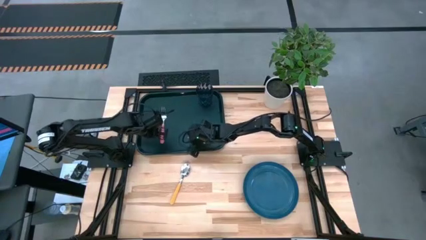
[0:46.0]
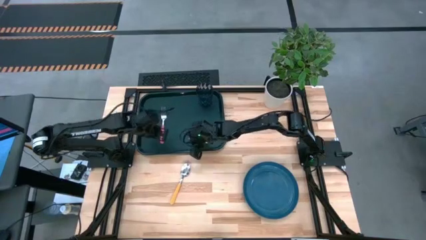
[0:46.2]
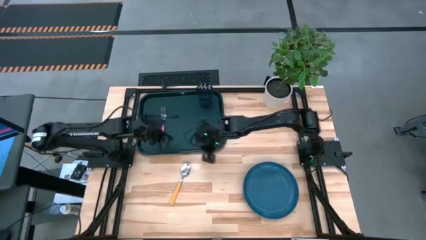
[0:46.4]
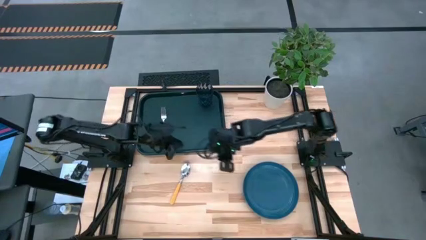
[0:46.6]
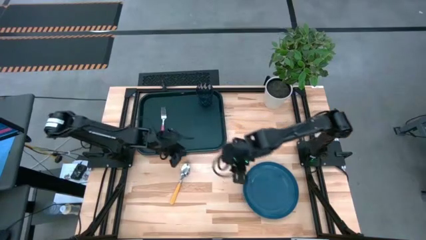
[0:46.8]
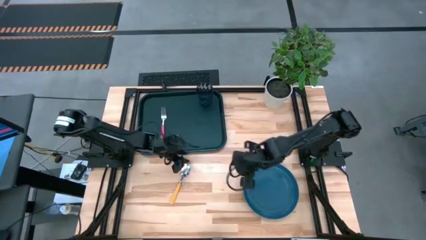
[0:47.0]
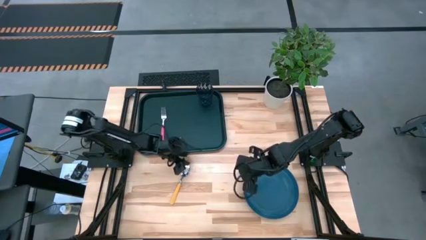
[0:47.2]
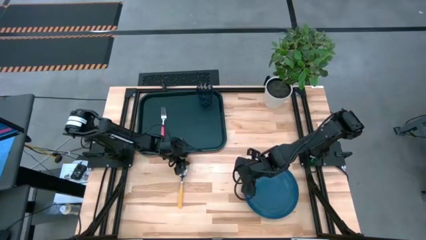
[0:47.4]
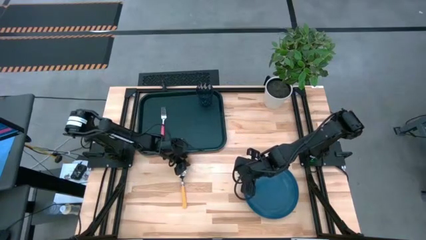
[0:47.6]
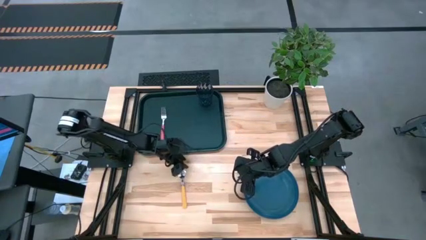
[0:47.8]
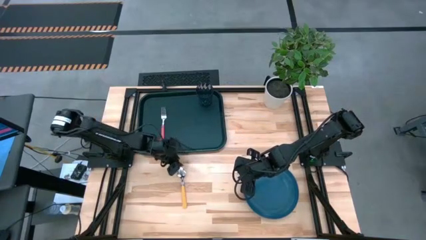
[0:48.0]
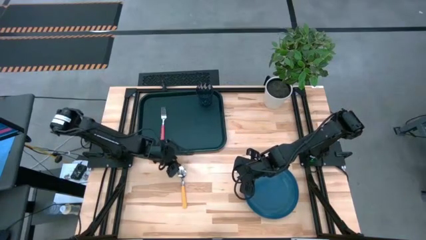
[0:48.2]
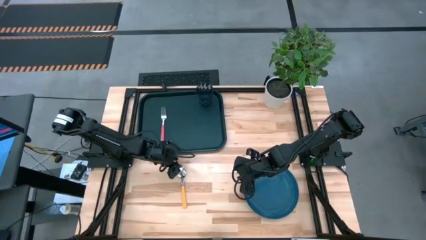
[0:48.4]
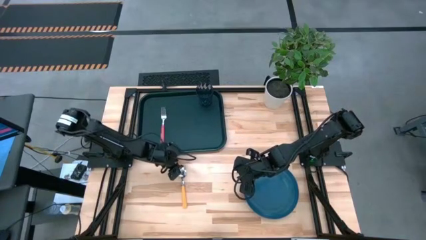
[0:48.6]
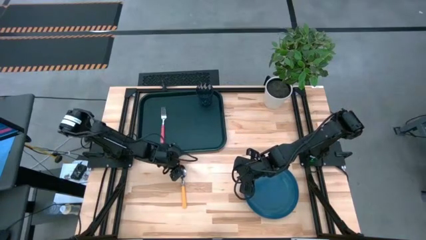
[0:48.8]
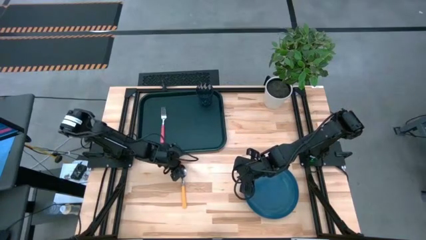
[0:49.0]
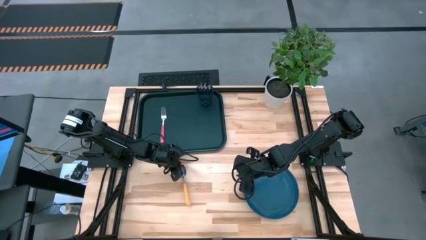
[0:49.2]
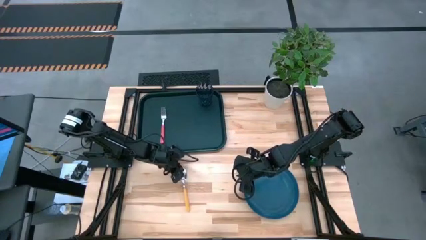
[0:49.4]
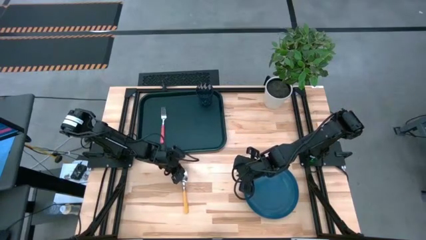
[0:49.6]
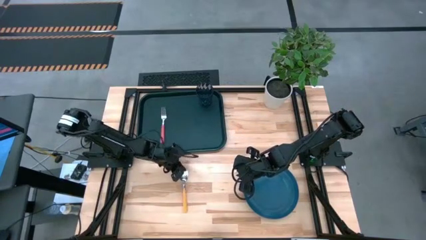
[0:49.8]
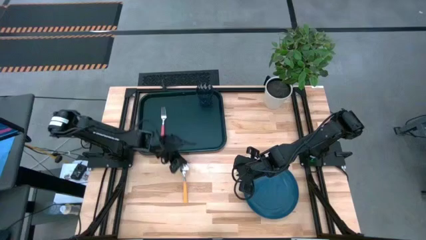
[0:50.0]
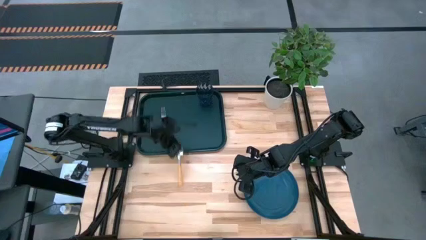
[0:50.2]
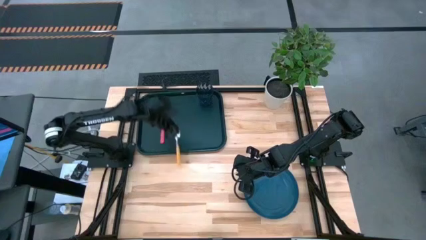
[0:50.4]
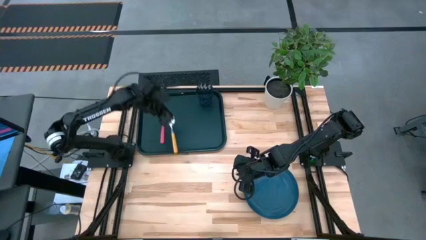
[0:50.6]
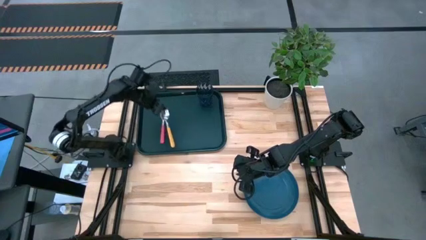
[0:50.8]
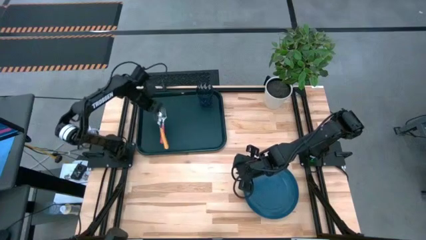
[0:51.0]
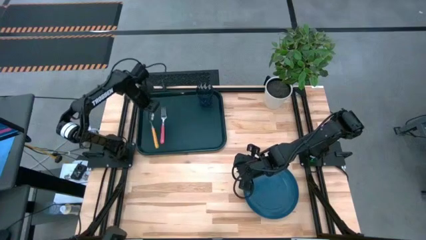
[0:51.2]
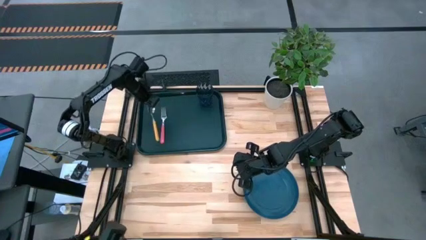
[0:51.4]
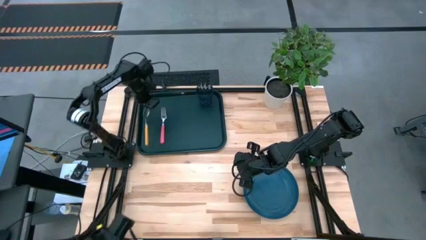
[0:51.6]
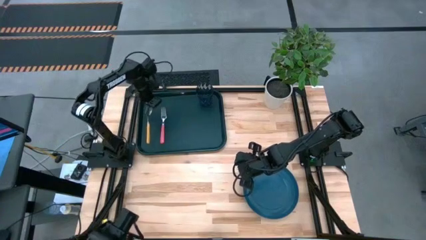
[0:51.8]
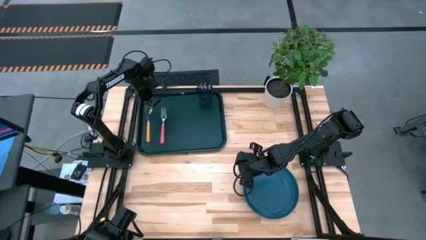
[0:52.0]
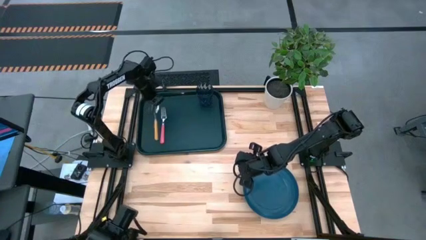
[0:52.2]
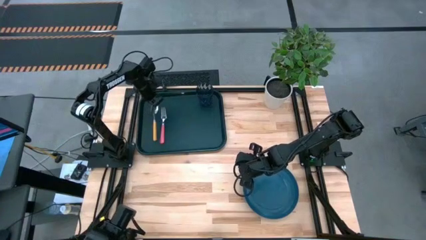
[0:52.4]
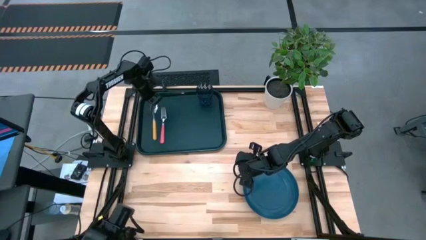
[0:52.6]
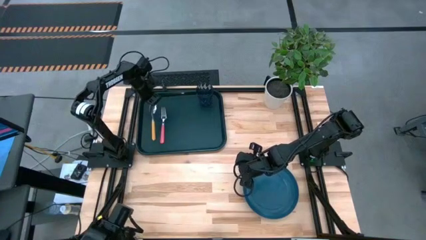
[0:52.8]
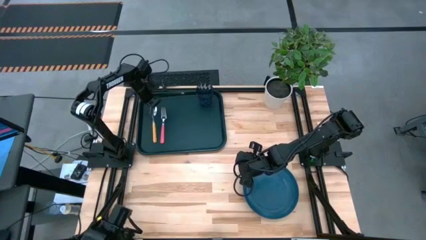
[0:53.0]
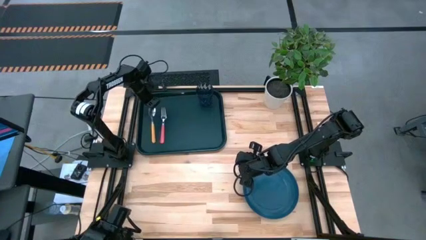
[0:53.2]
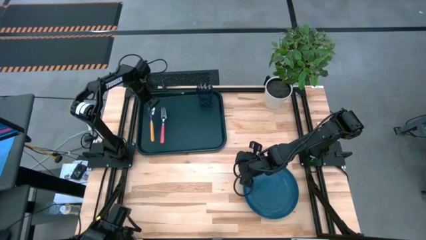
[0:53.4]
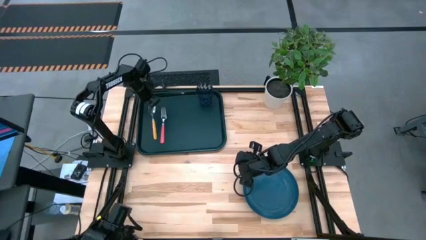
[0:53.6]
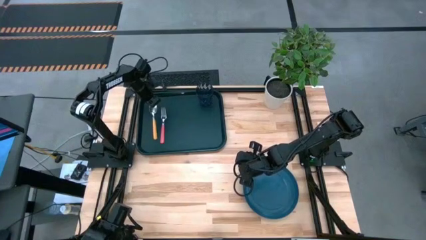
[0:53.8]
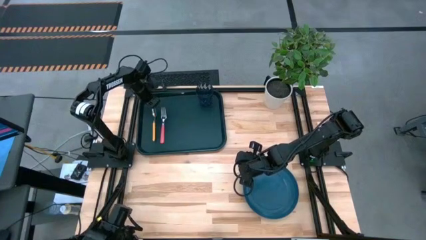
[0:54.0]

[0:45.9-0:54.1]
Task: Pick and place plate/cup/fork/spoon on tray
Put the orange spoon on the black tray to the left of the pink fork

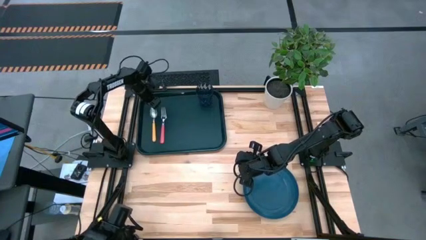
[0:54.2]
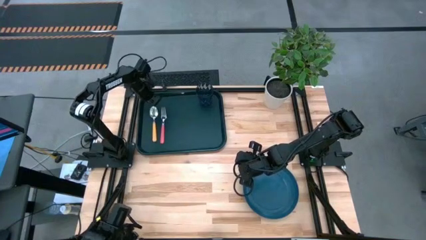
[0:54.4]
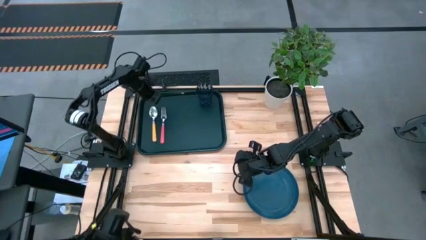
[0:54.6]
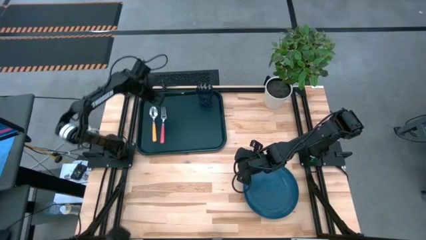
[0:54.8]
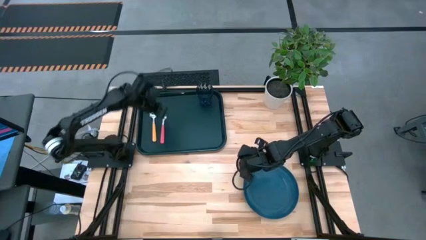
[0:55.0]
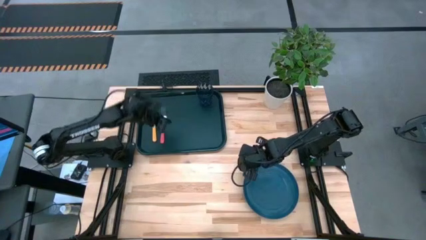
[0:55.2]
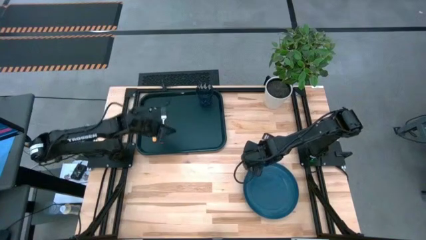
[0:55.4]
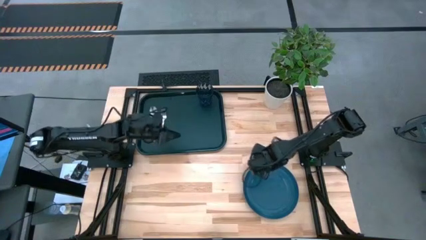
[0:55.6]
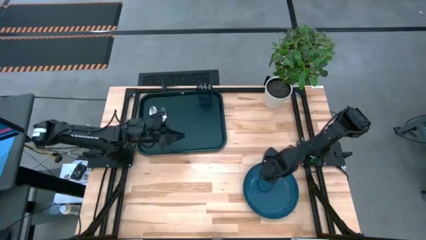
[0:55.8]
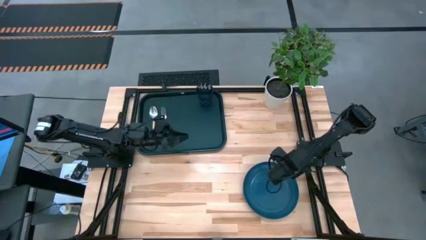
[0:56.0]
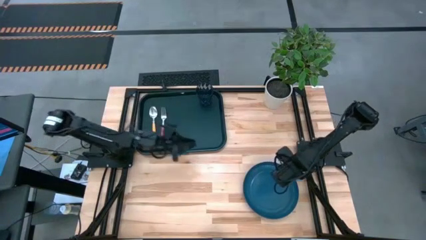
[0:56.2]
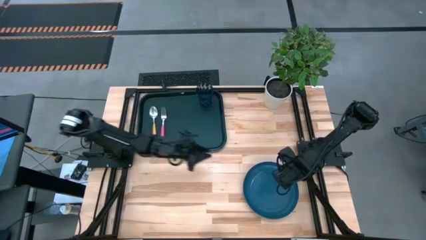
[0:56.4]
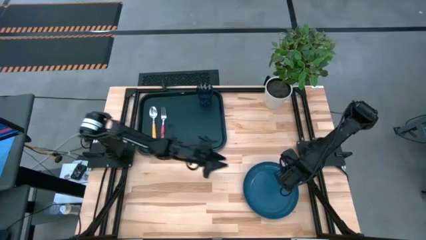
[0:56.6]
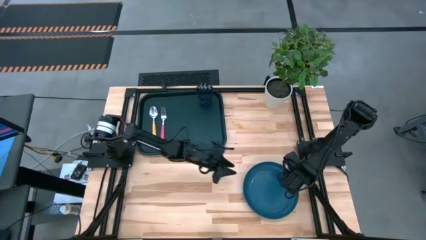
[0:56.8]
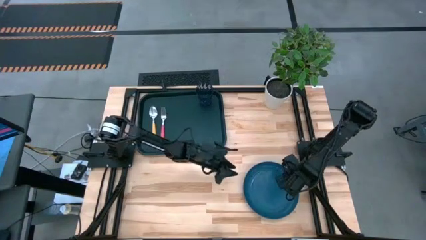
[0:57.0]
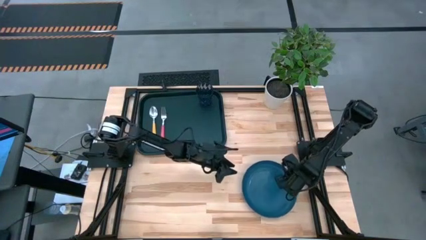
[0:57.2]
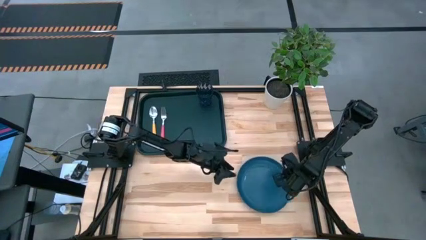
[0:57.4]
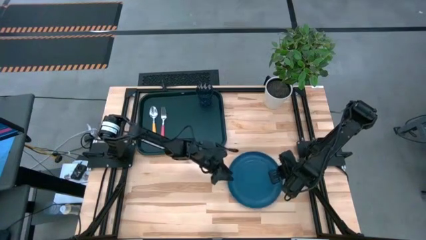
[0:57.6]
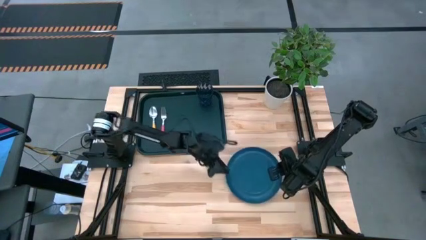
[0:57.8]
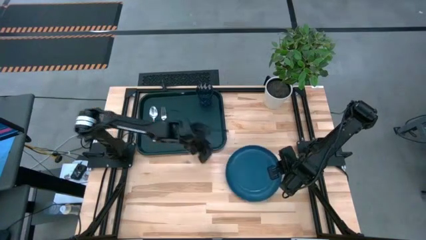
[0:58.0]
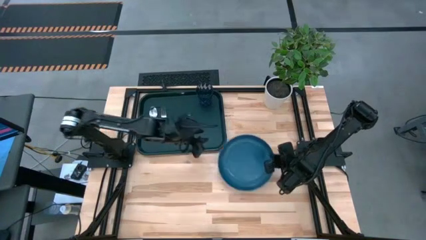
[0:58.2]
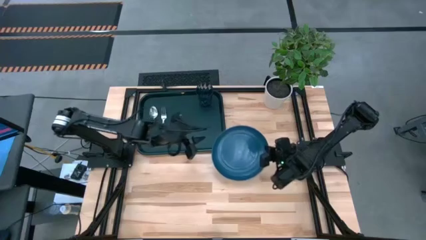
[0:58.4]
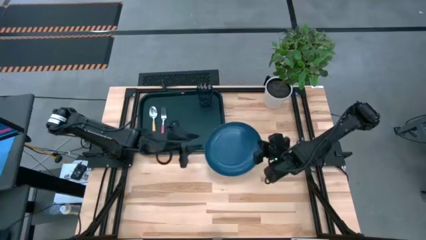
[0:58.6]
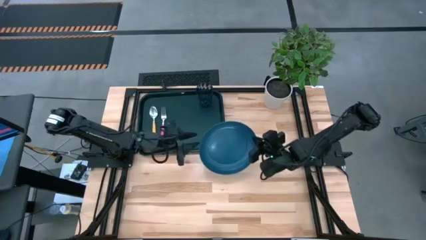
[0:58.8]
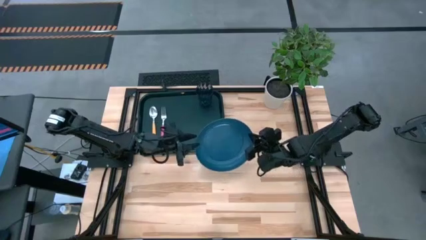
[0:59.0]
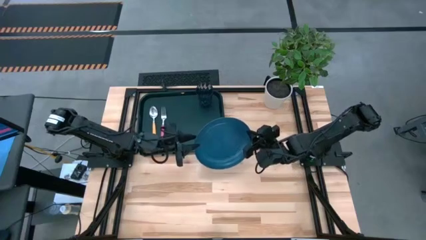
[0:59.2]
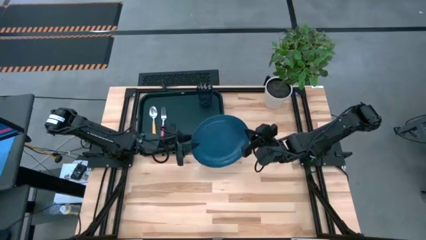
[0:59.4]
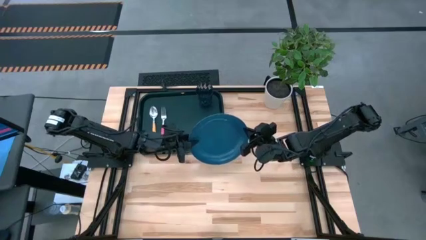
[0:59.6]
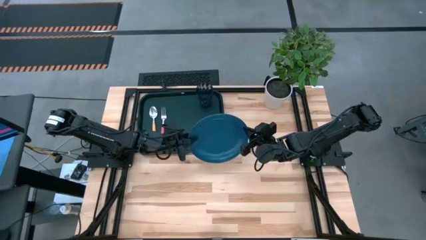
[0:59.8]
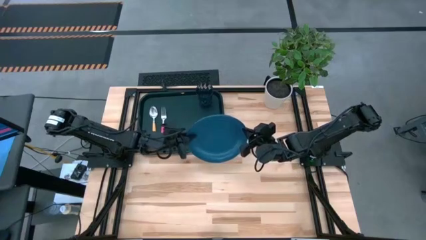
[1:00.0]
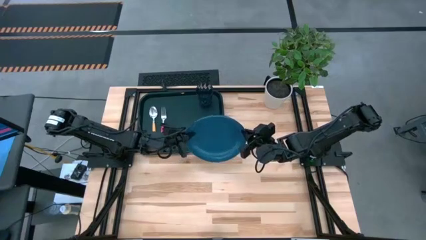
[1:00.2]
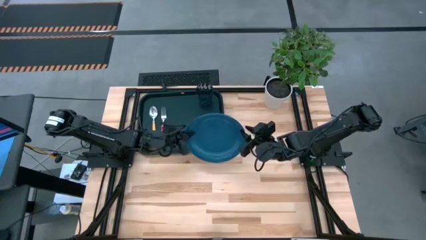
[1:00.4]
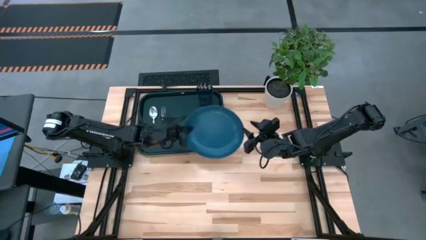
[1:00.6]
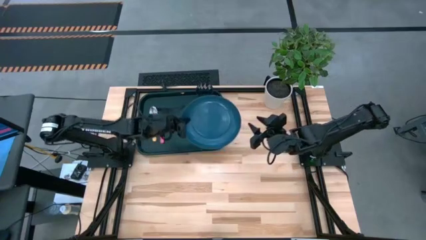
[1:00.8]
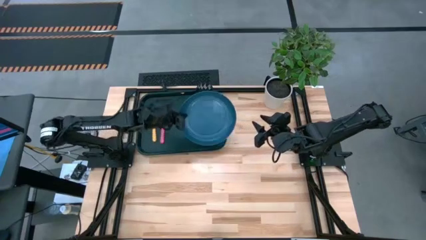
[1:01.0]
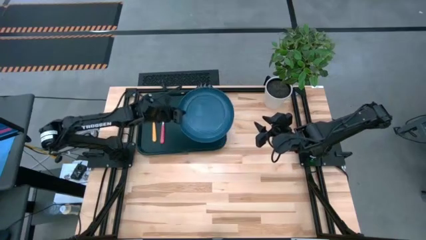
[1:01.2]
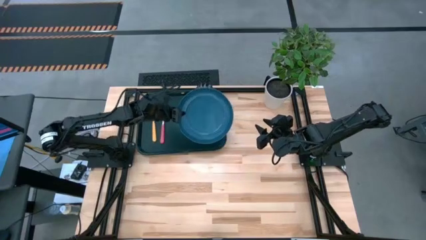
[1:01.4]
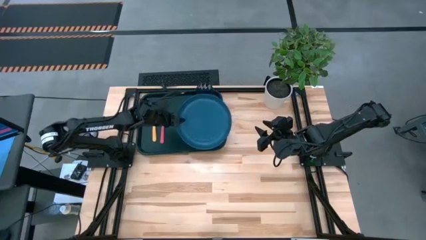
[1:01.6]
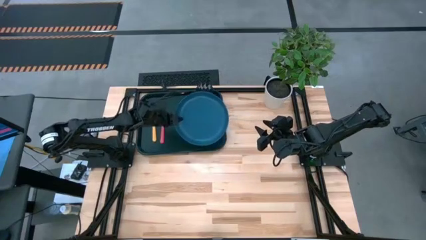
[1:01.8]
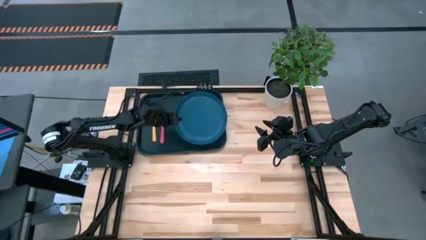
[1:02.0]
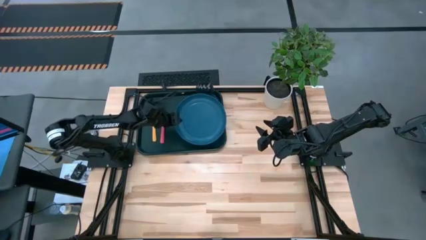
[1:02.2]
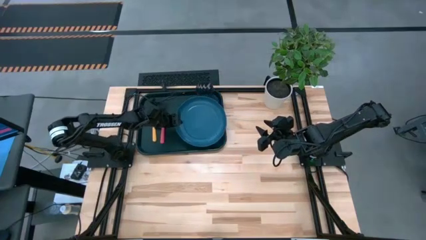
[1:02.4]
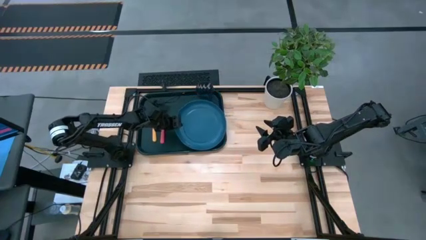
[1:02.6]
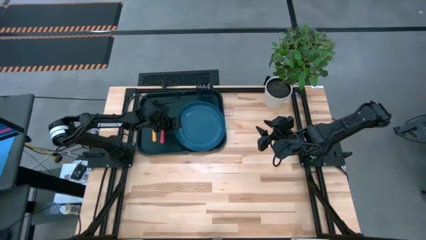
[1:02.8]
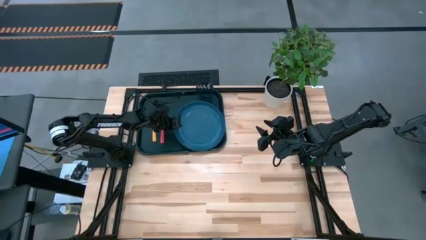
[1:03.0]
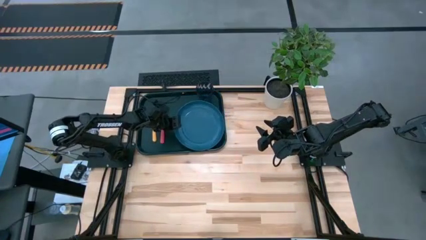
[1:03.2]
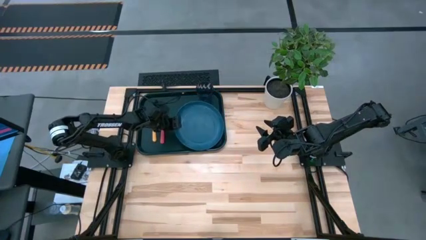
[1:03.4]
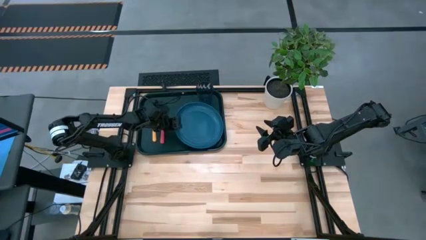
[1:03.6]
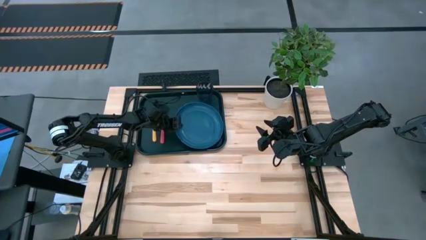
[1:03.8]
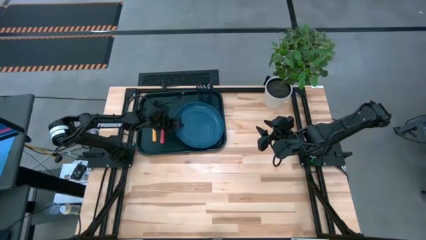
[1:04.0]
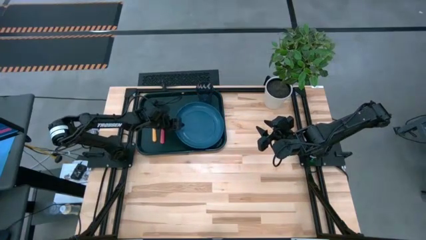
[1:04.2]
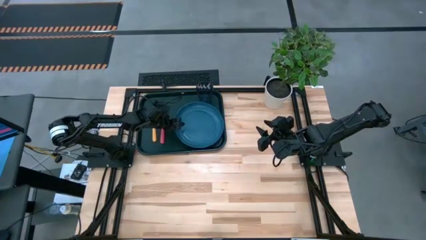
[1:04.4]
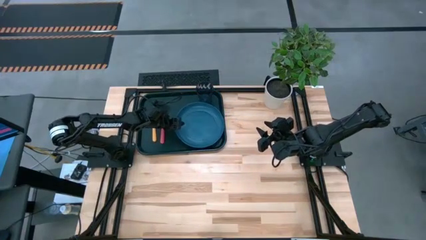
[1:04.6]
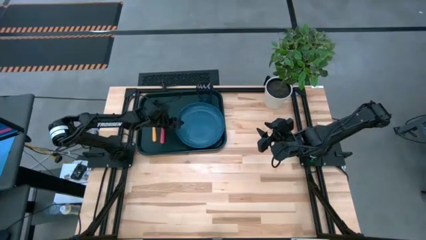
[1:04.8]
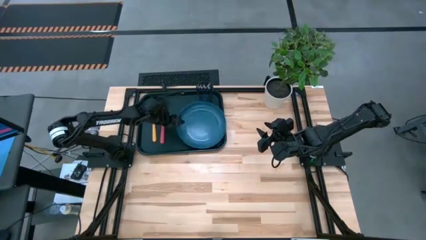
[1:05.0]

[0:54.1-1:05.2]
Put the plate on the black tray to the right of the pink fork
